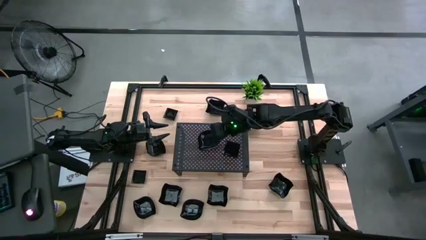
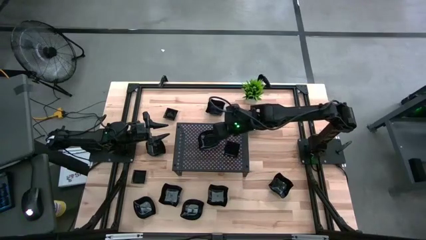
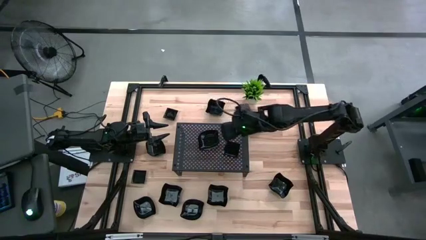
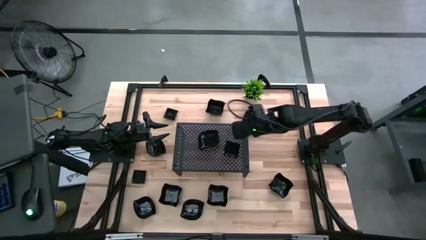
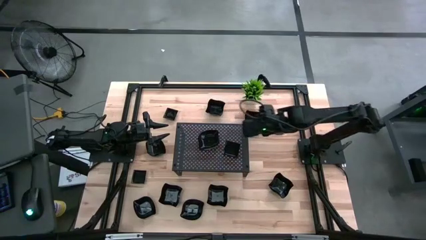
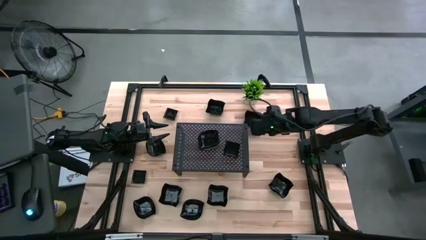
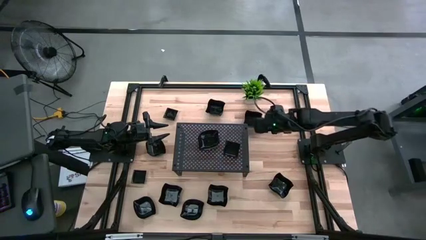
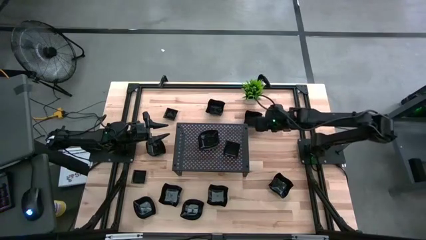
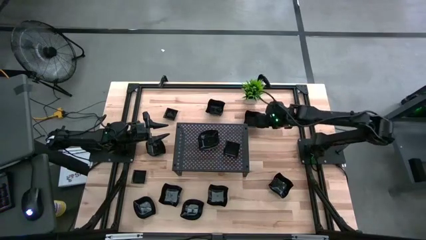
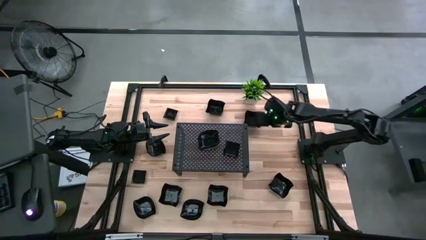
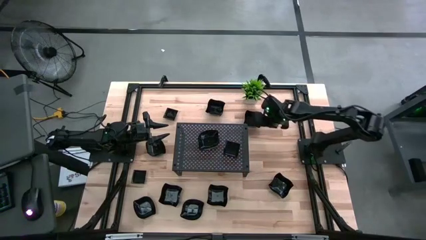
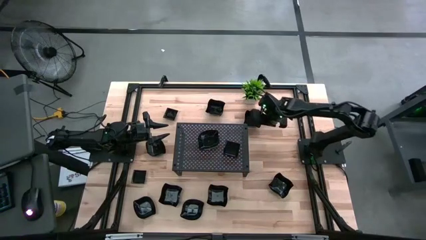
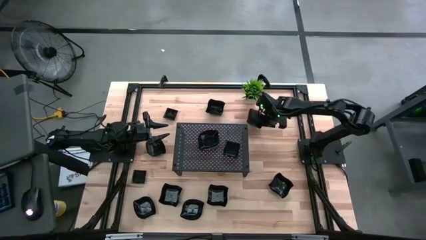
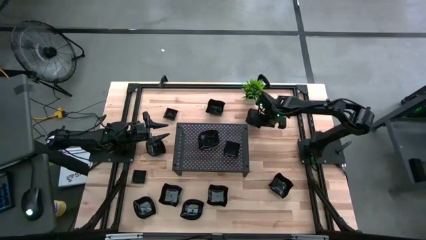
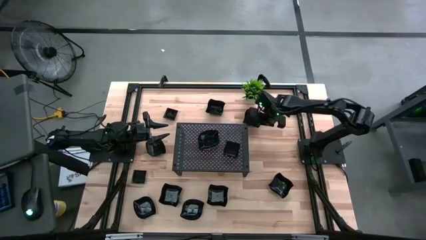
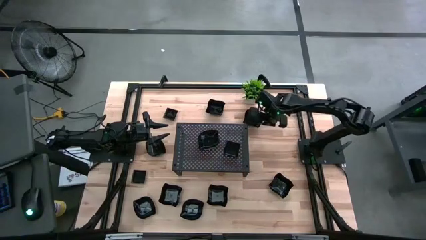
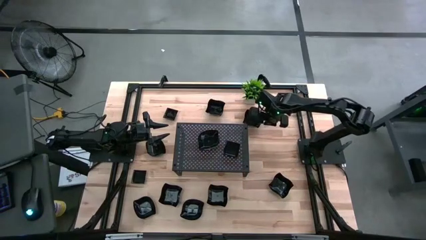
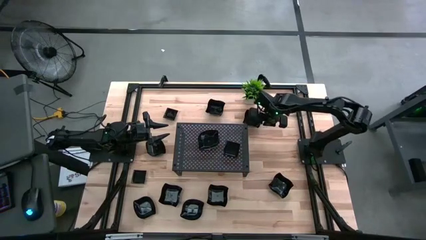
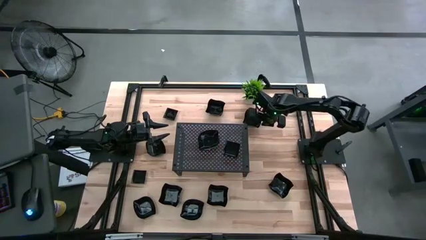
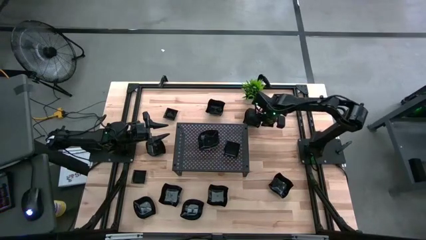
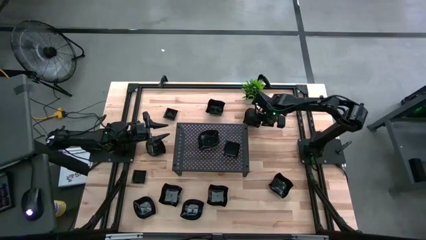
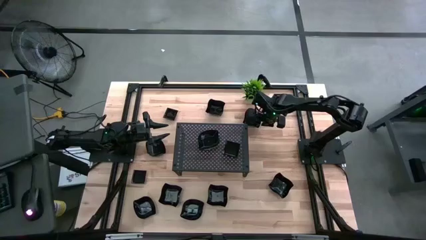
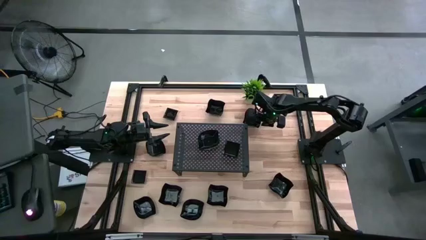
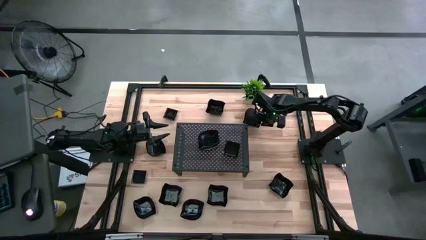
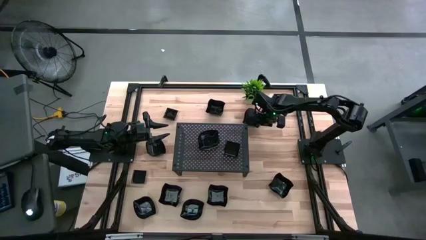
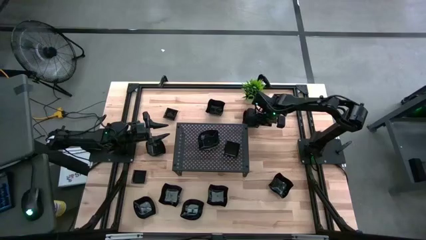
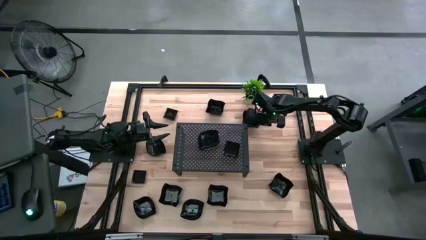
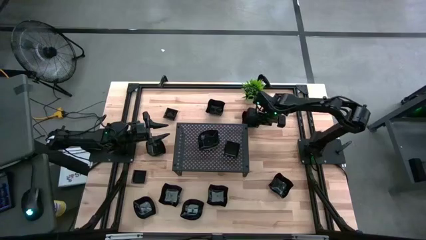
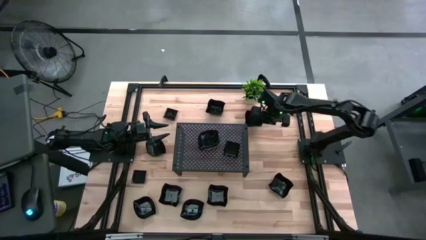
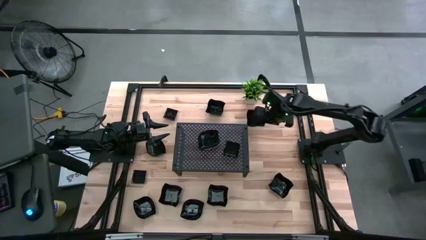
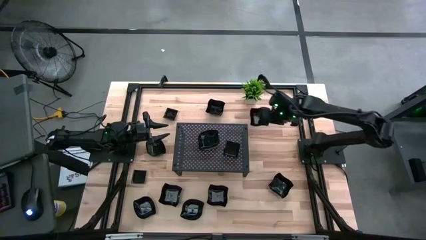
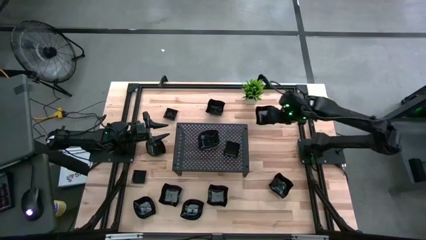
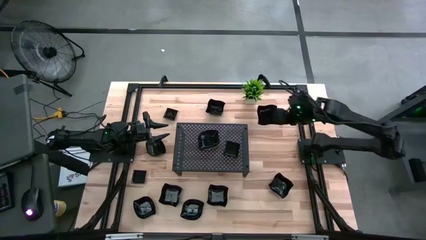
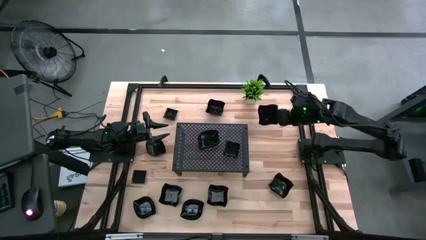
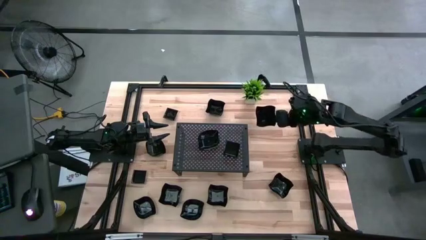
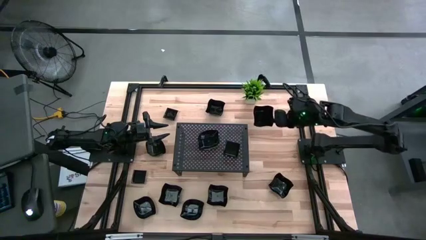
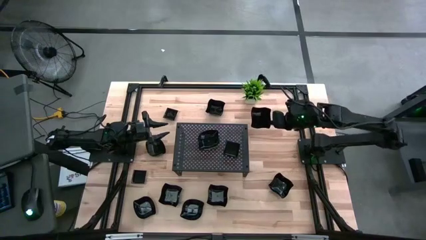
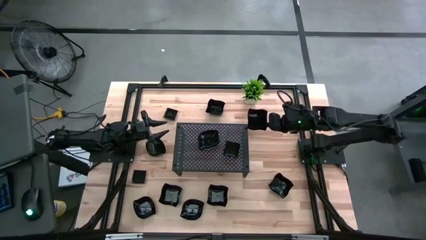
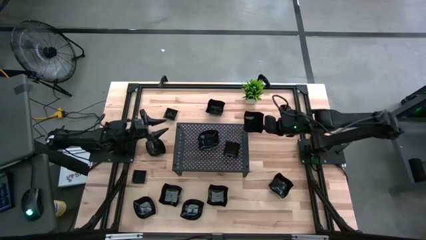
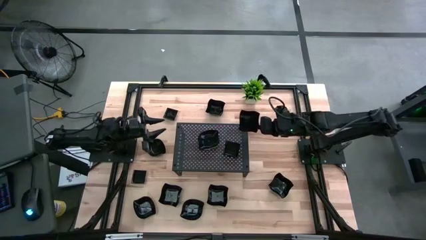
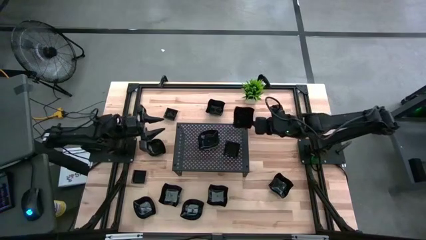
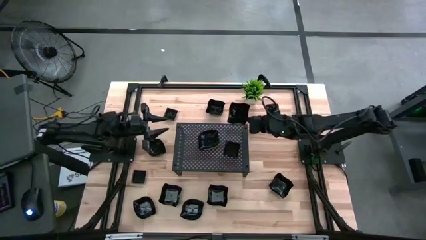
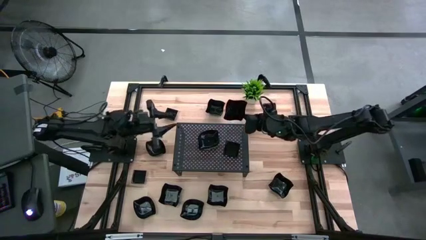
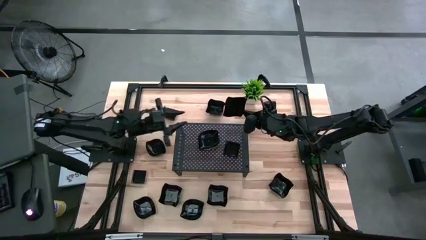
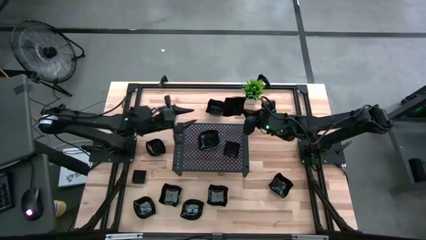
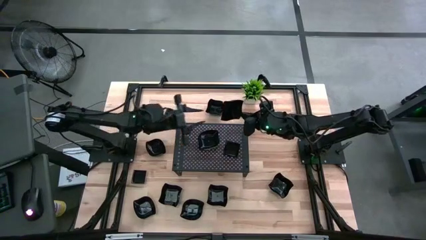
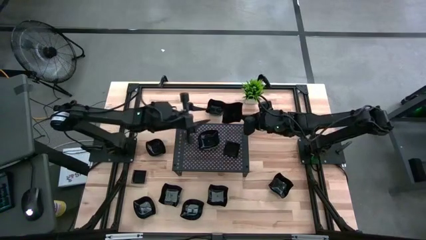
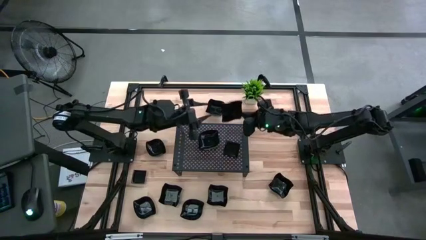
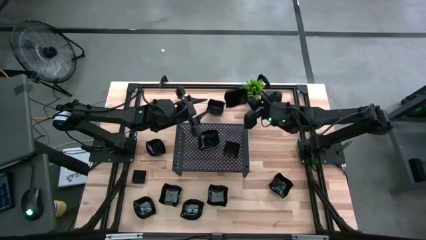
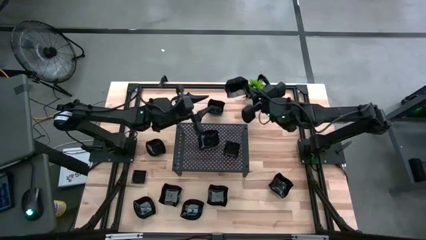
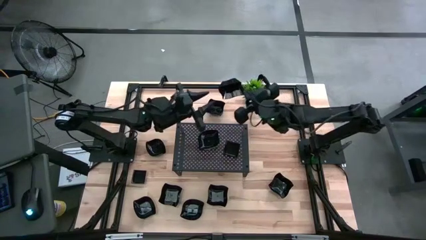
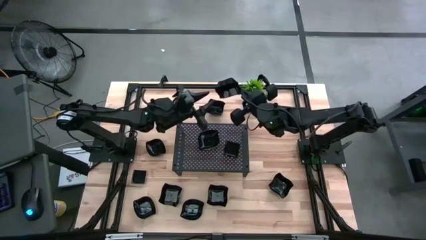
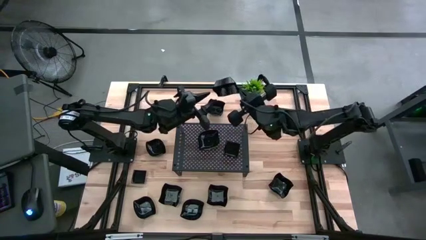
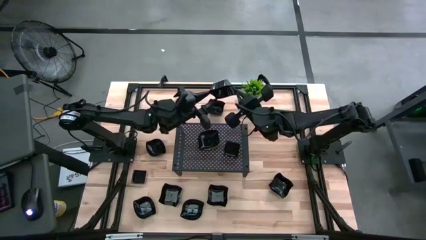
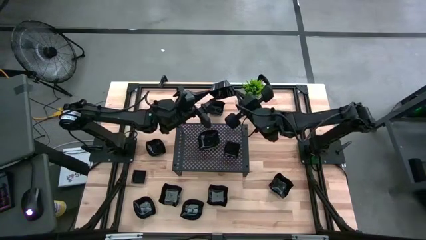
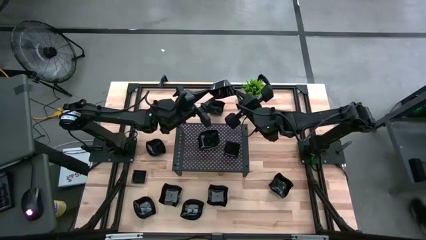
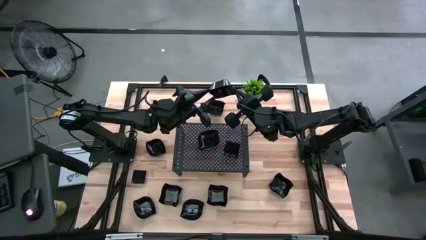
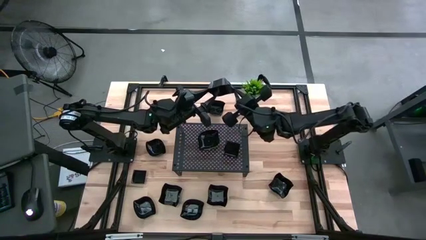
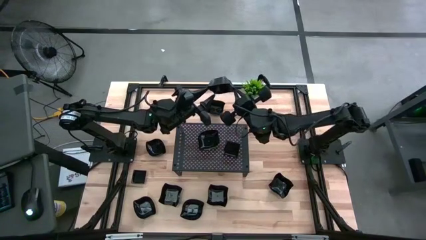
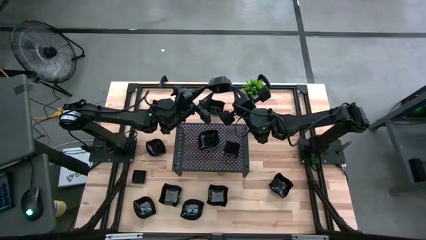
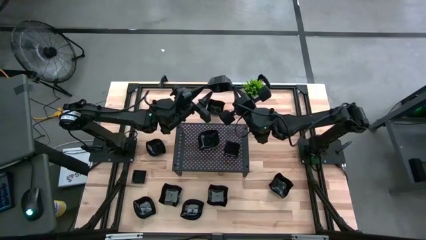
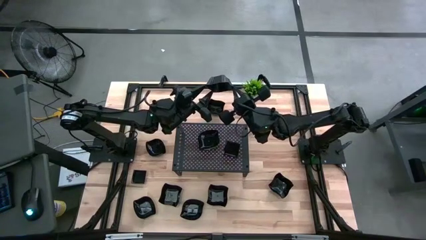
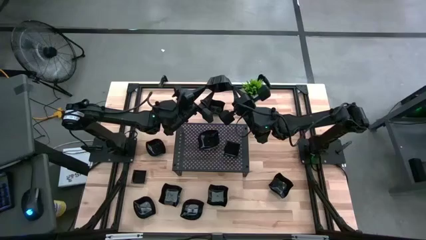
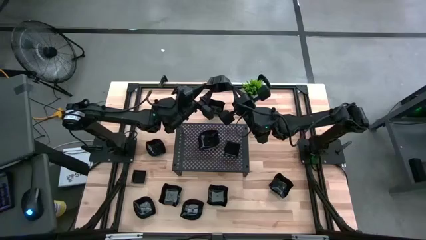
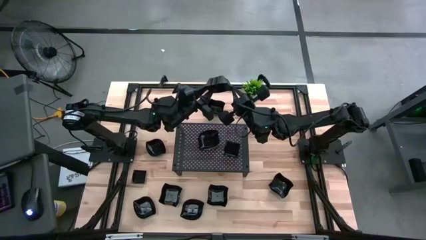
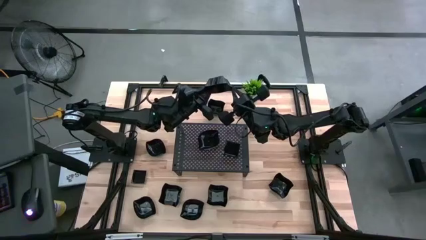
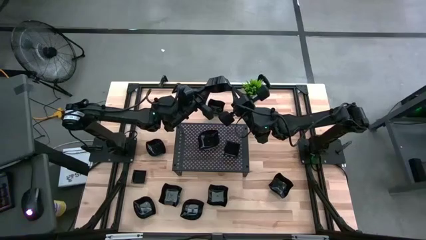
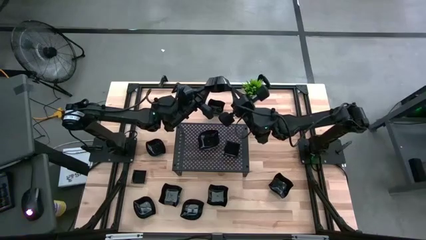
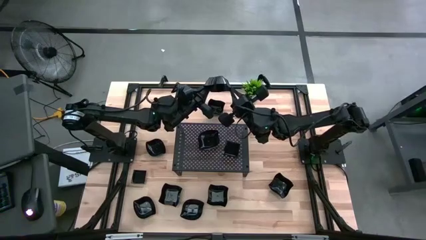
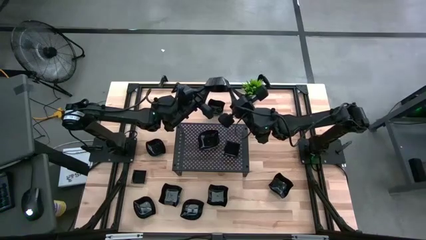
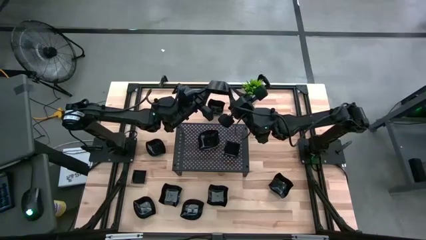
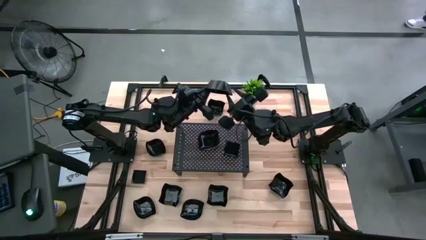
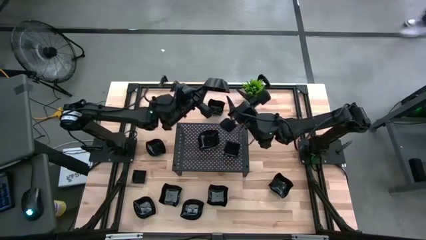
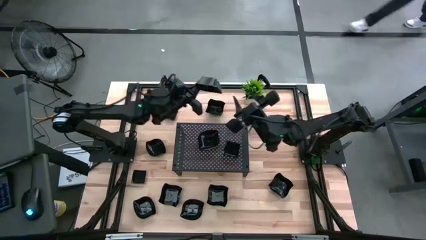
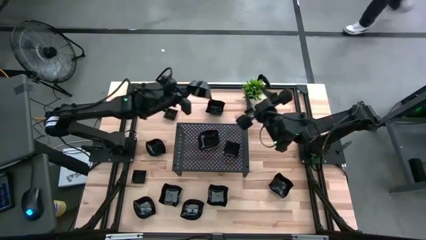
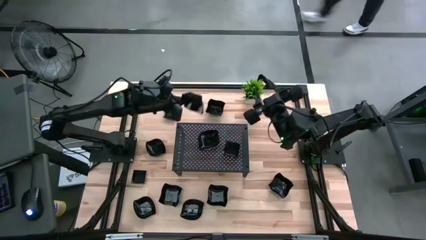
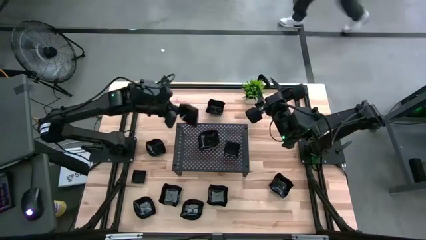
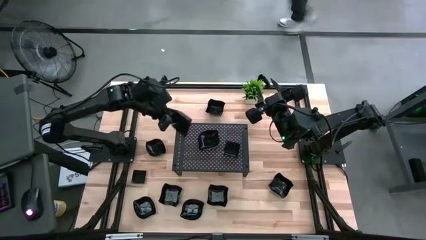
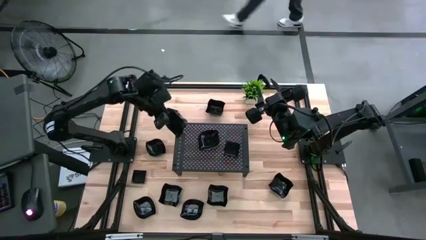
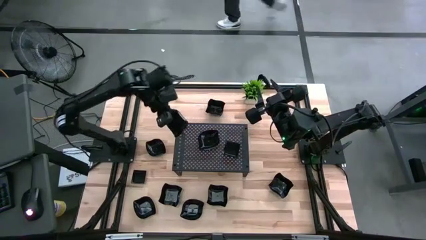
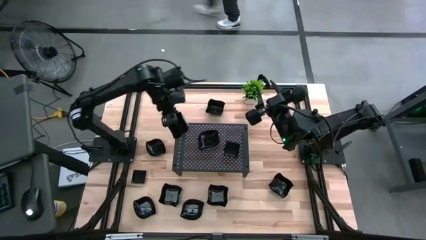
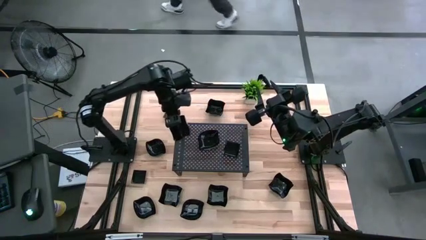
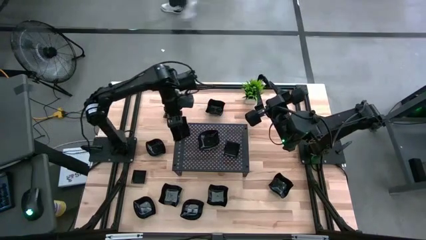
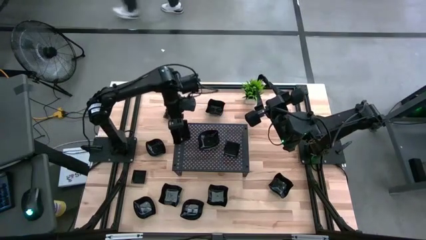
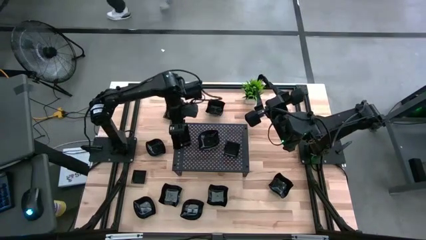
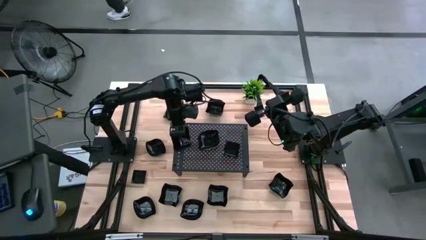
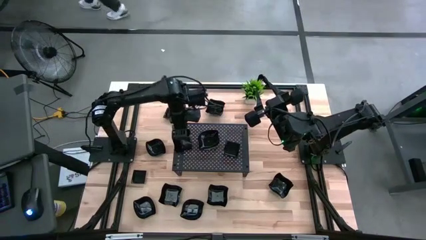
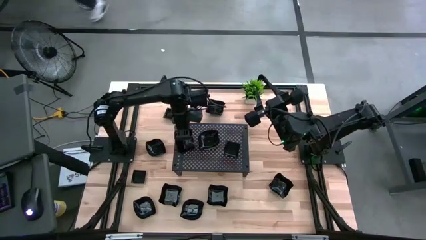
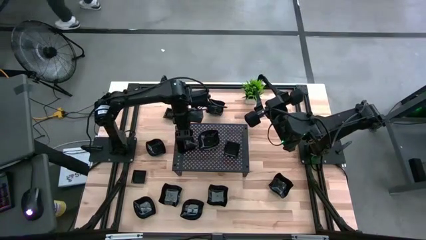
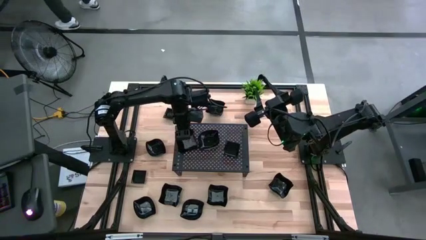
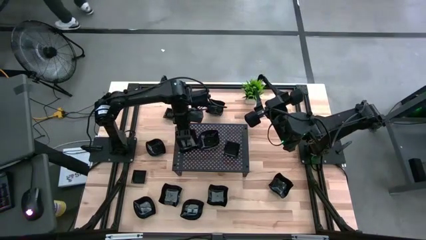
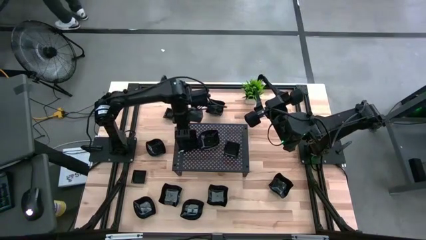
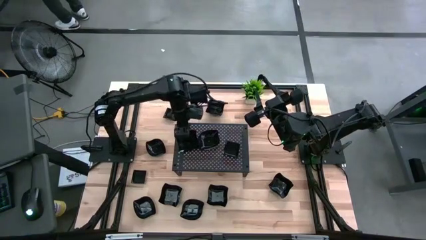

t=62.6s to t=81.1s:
Task: Pick & Place Mini shaped plates
Put the distorted square plate on the shelf
